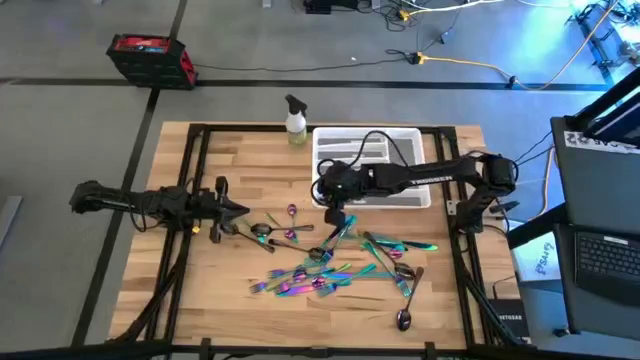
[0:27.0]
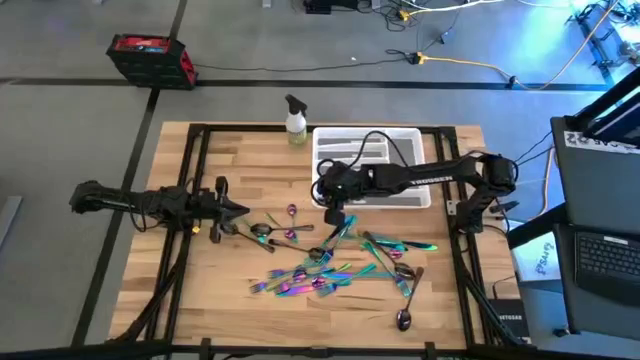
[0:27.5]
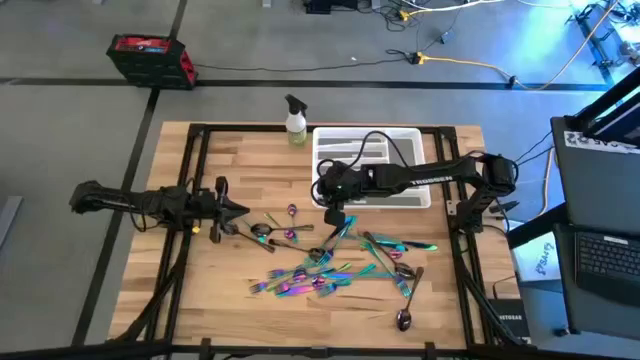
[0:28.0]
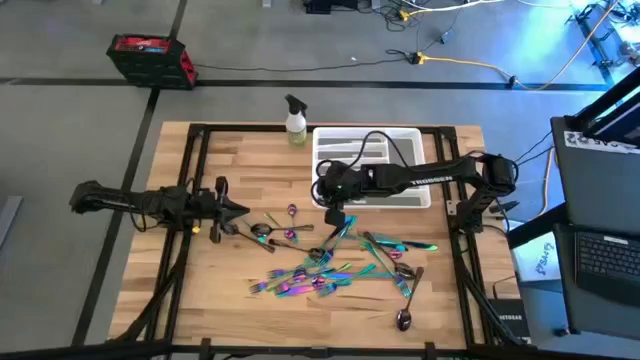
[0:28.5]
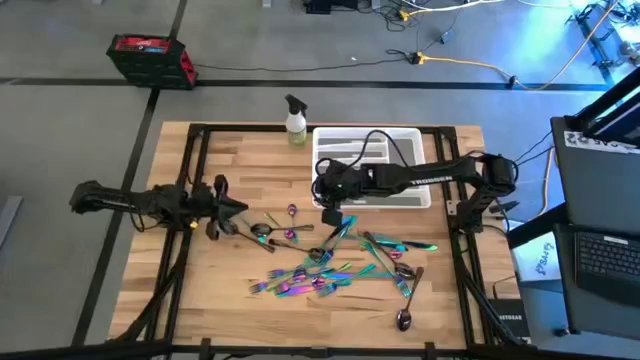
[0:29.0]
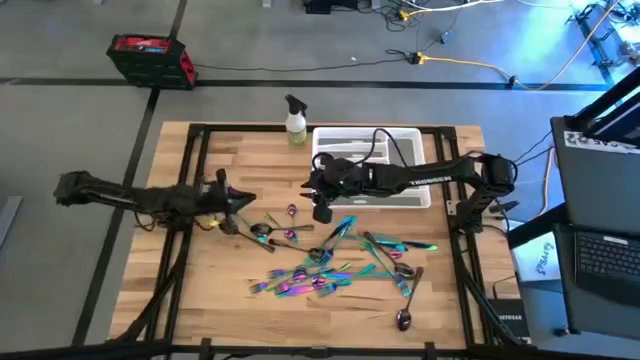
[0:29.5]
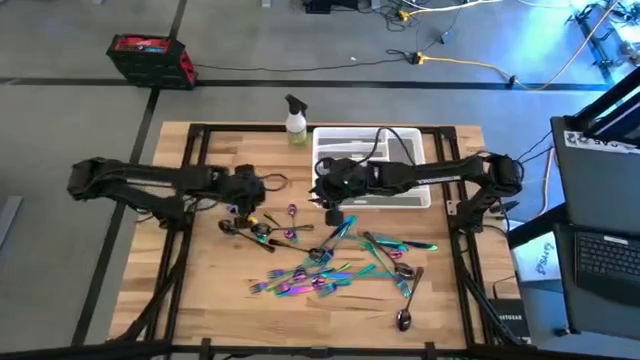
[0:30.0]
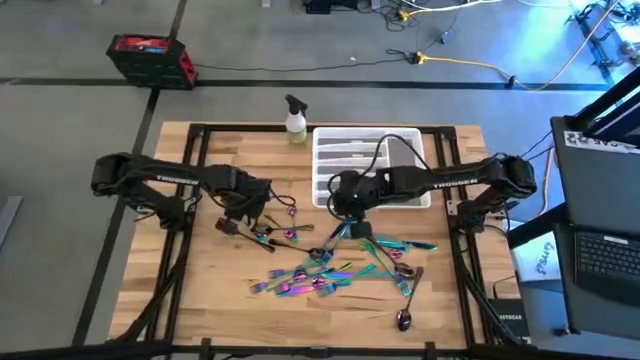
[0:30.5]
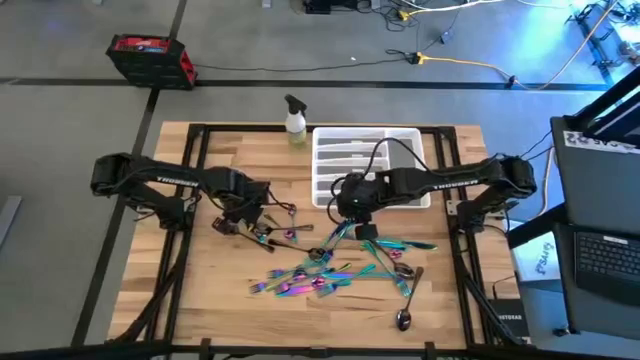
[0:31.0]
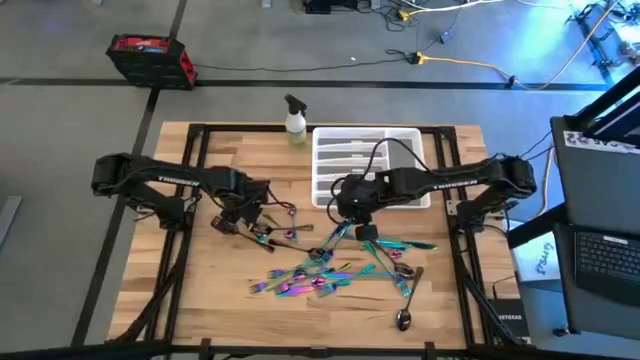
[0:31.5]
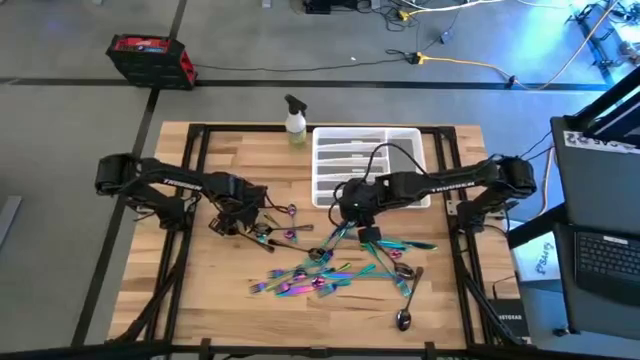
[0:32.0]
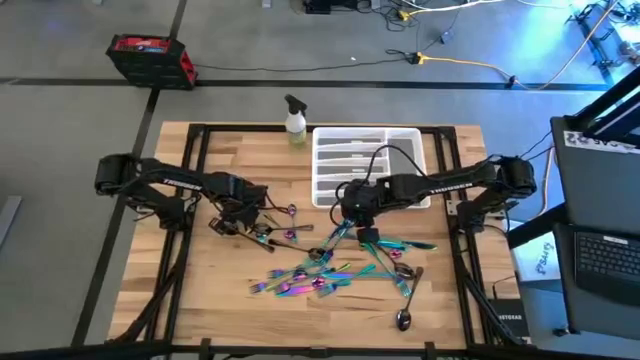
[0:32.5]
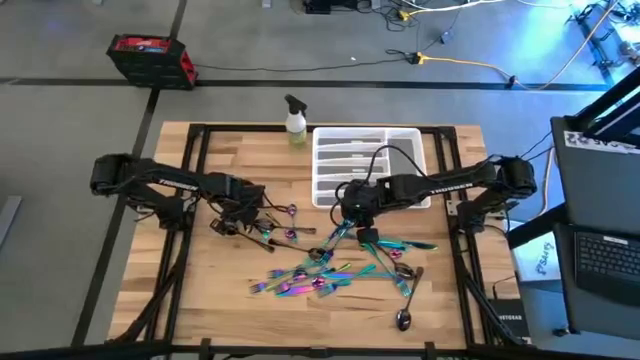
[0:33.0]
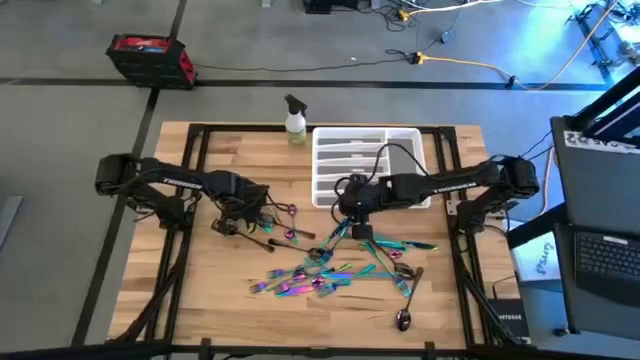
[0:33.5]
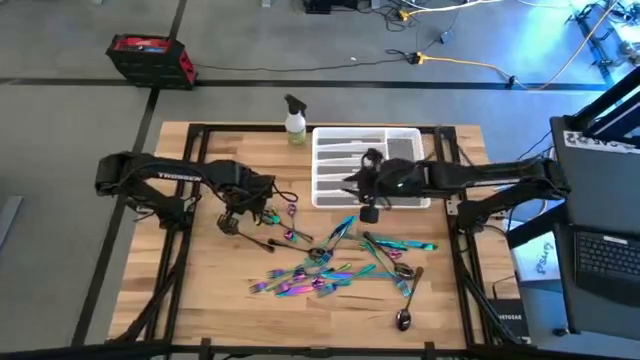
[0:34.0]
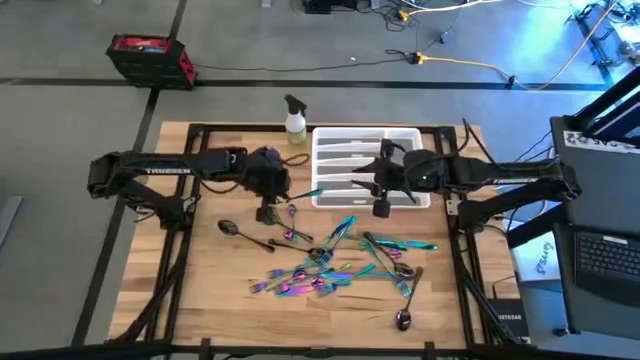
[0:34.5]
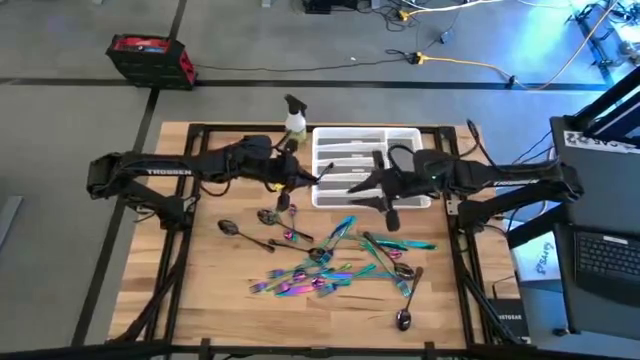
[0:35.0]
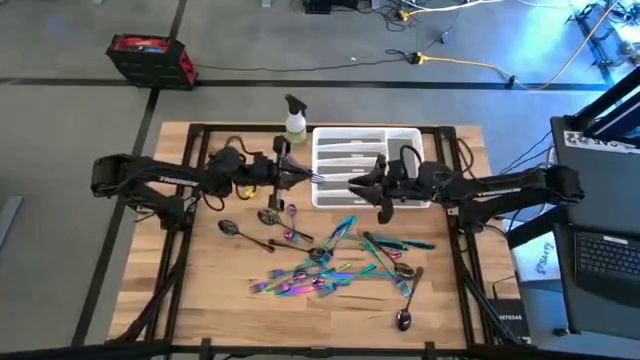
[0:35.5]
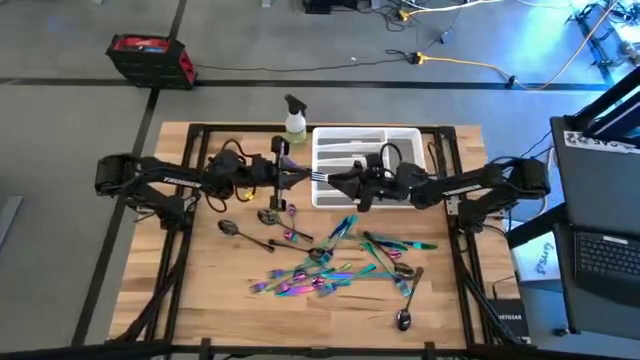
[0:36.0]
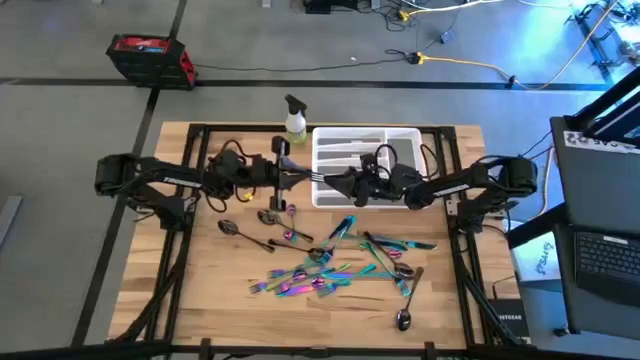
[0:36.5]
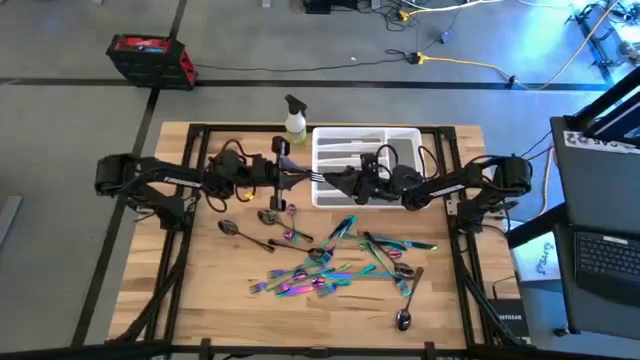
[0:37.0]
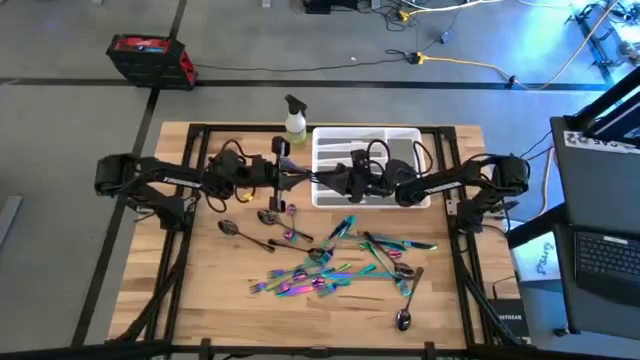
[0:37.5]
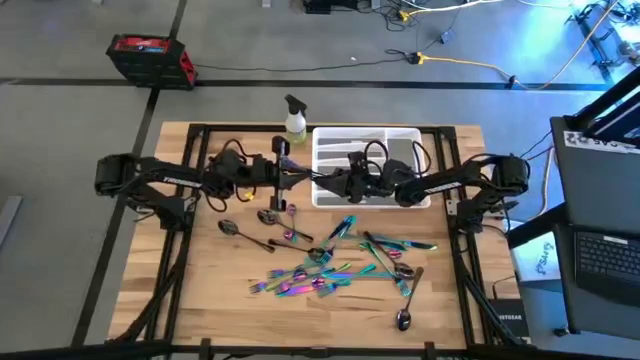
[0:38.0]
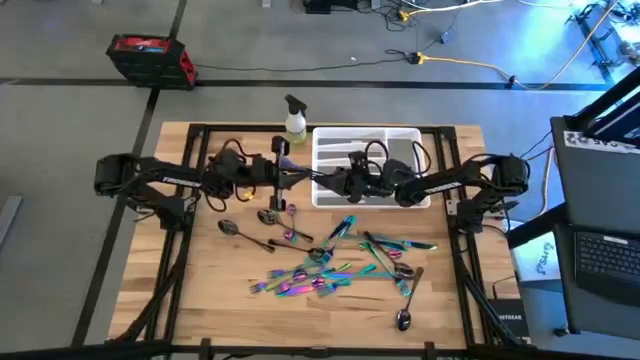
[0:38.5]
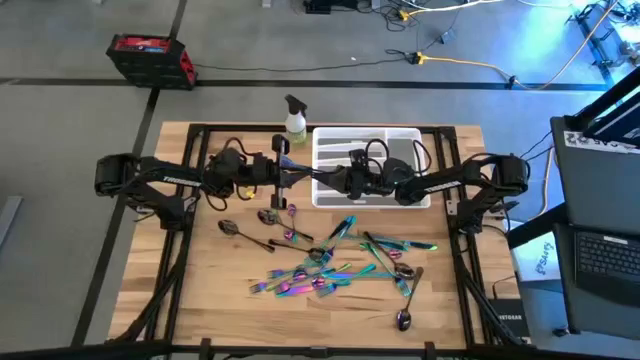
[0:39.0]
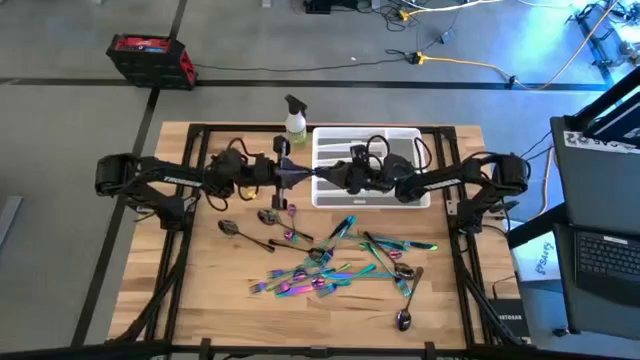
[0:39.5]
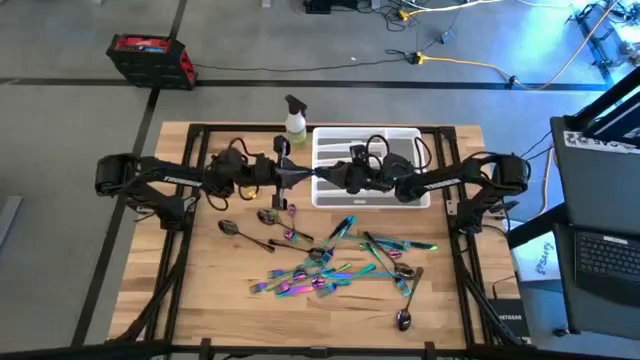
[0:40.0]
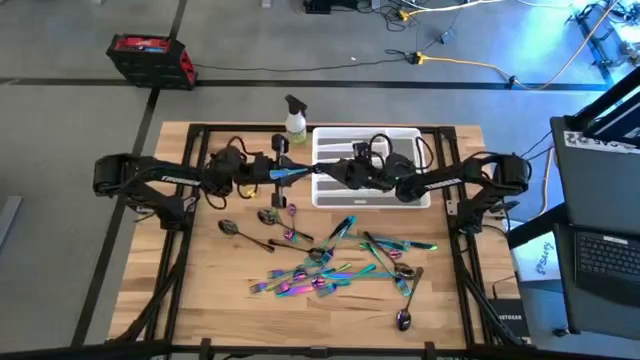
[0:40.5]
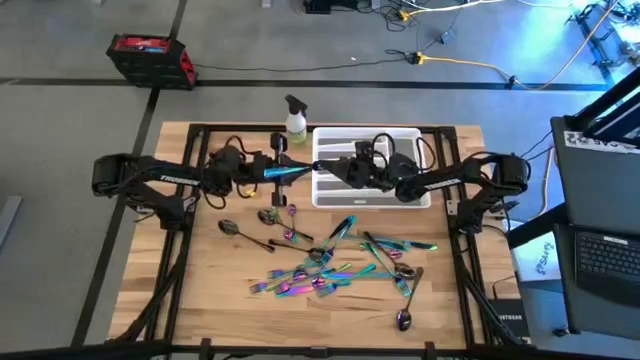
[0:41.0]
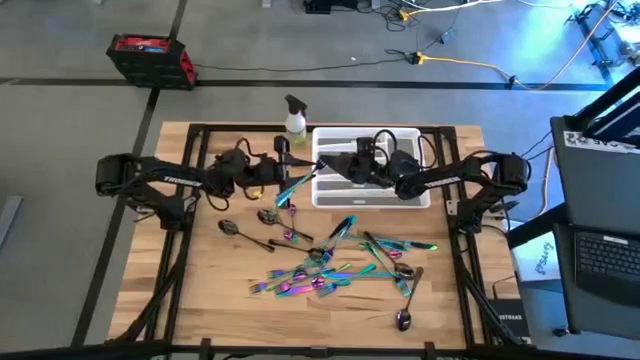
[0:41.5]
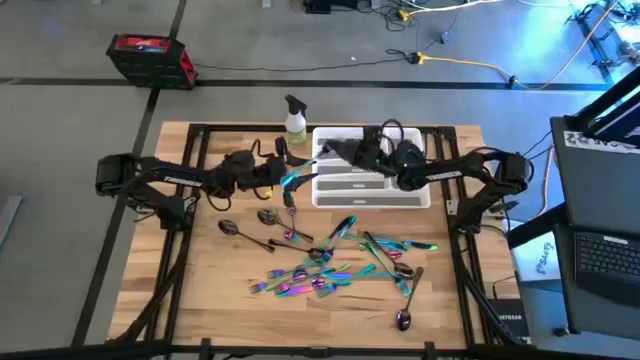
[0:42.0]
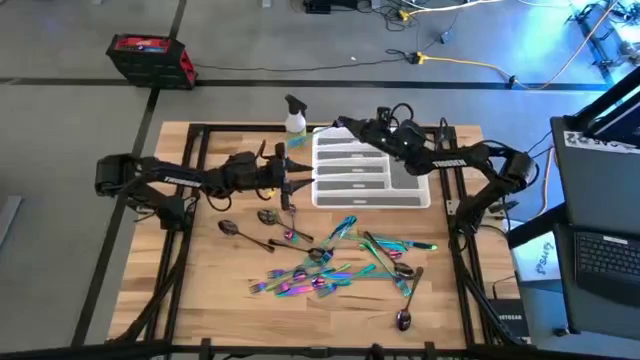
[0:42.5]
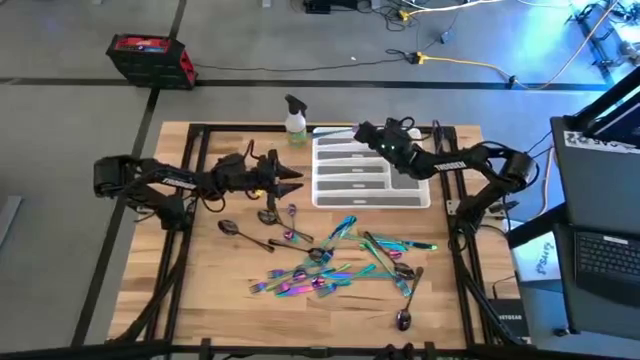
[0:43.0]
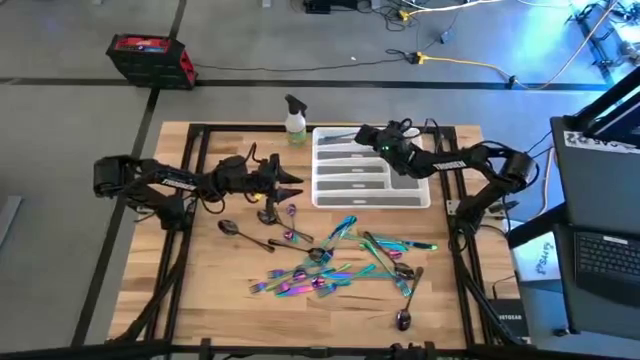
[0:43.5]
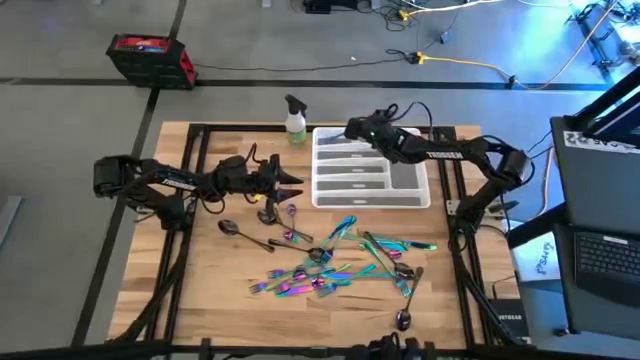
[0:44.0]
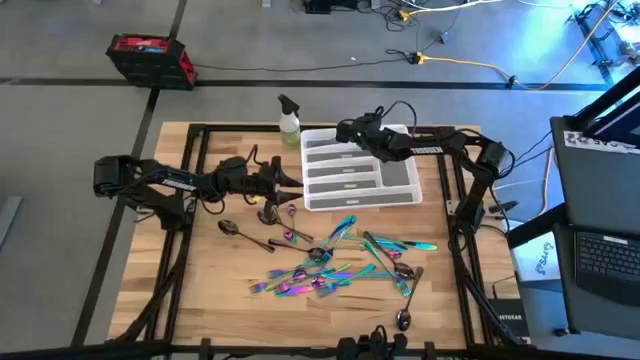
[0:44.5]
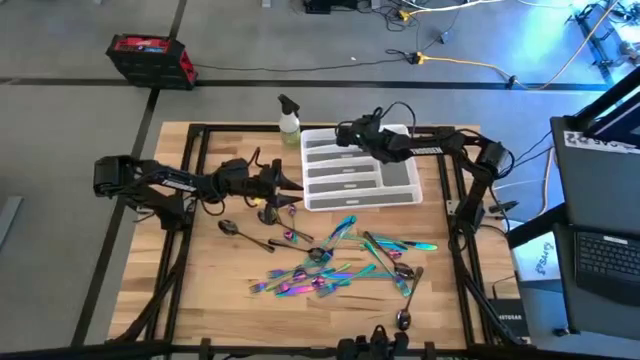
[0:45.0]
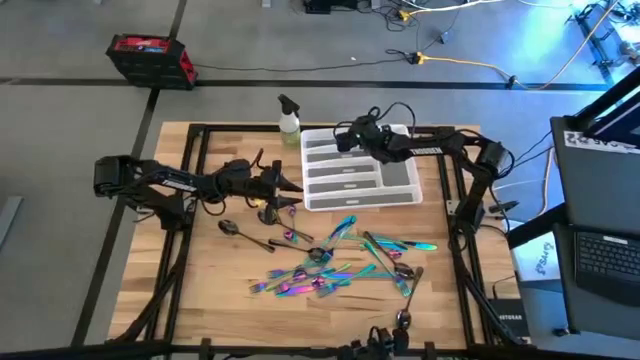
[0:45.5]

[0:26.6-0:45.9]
Task: Sort silverware
Put the blue fork on the white silverware tray

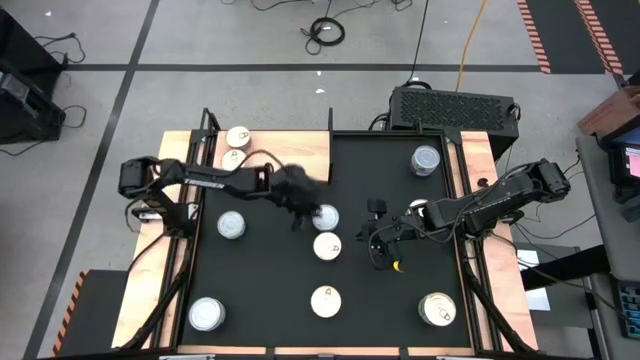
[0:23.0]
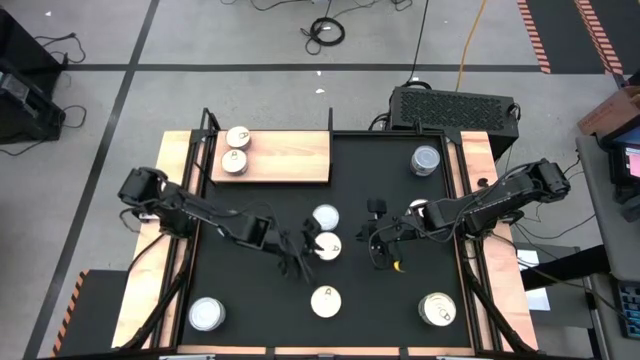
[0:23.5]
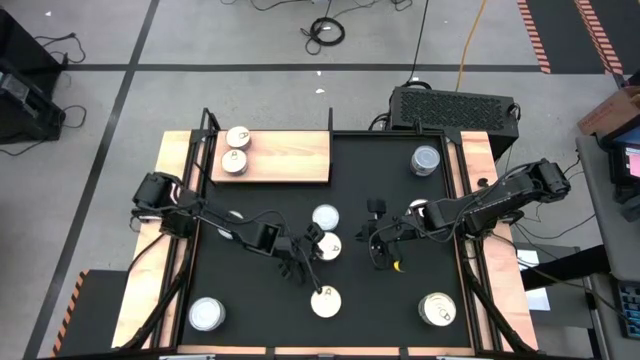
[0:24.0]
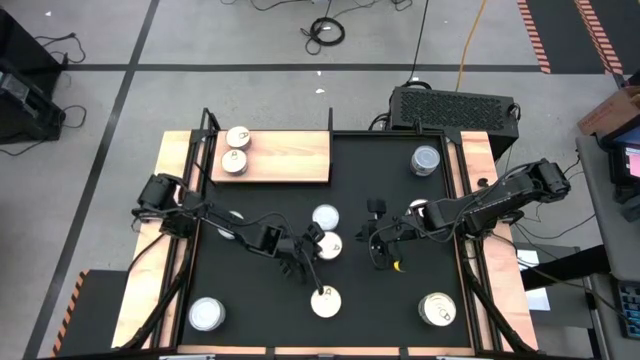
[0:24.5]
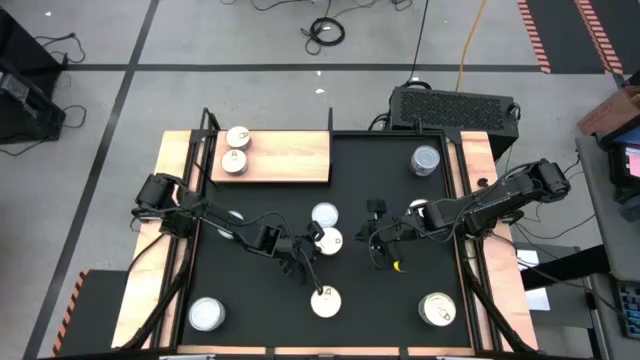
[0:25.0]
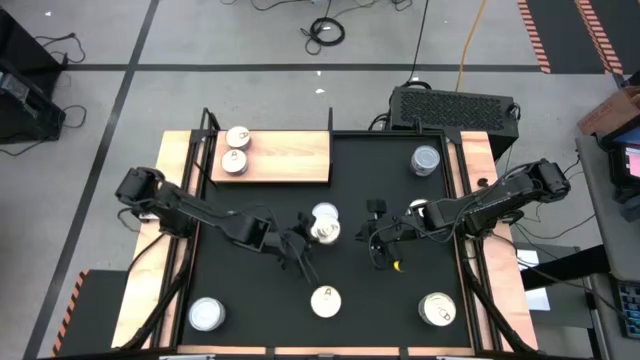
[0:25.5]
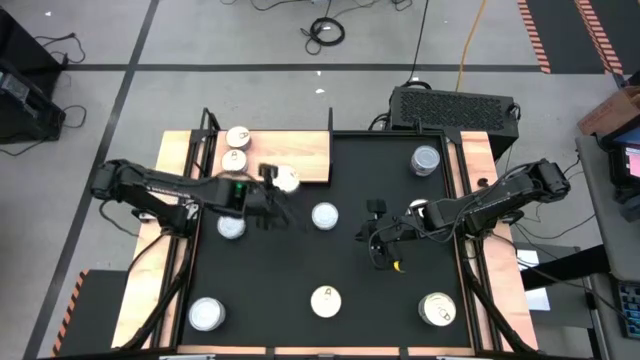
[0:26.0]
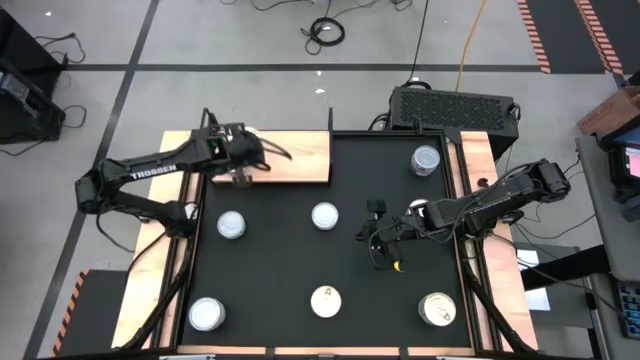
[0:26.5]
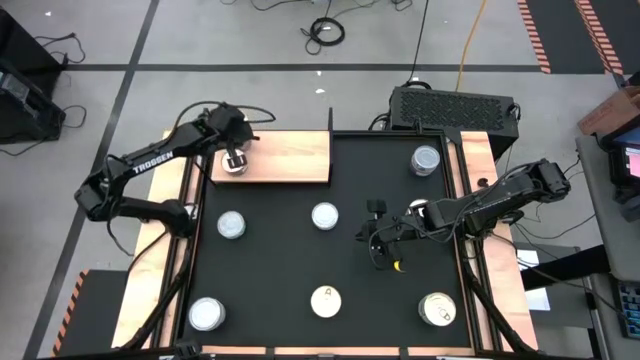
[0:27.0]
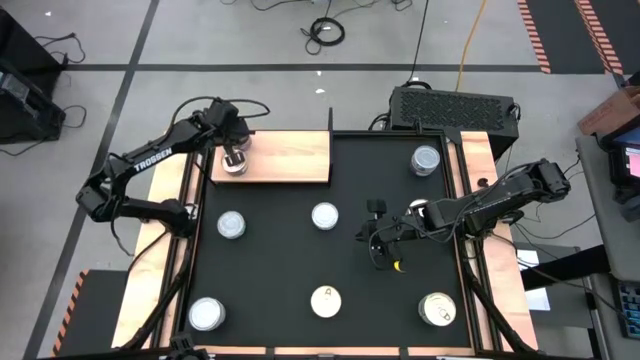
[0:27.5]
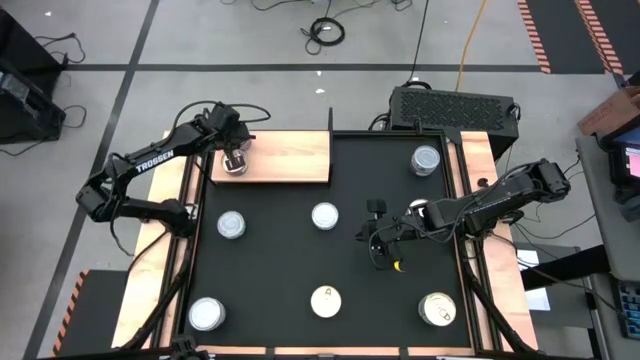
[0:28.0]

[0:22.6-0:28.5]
Task: Stack canned seafood by type on shelf
Stack the blue tuna can on top of the blue tuna on the shelf
